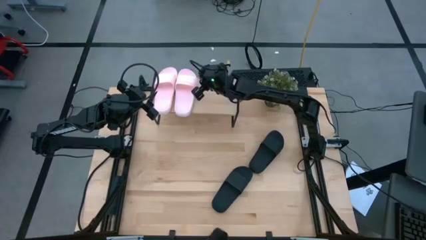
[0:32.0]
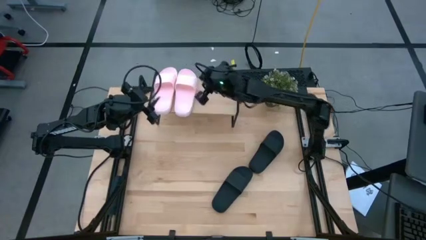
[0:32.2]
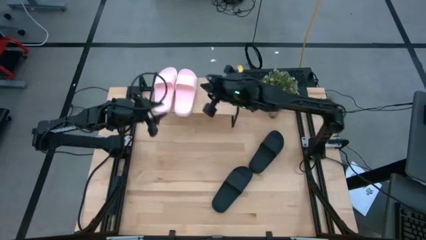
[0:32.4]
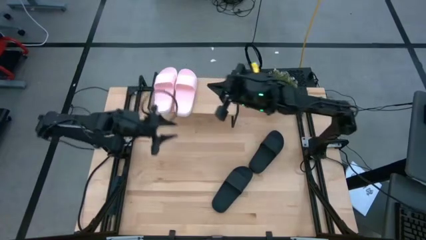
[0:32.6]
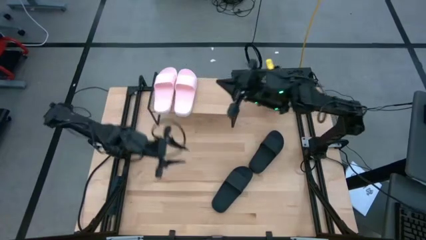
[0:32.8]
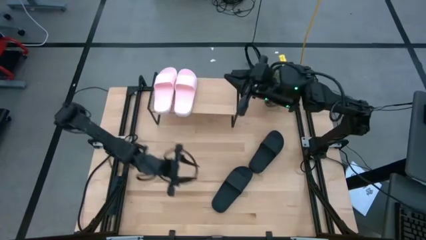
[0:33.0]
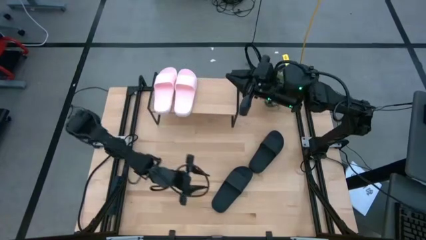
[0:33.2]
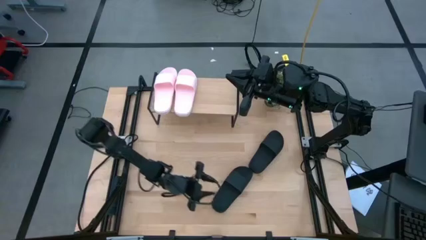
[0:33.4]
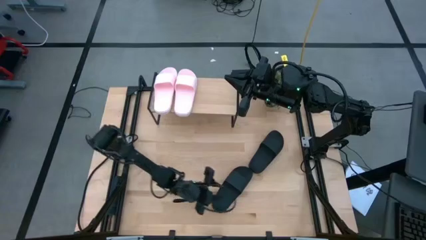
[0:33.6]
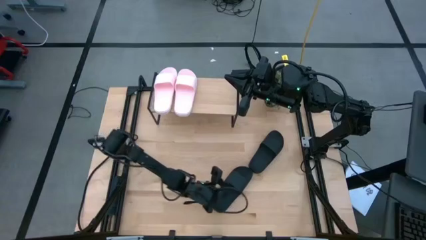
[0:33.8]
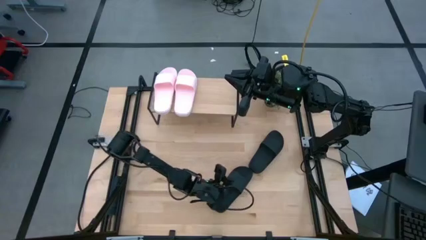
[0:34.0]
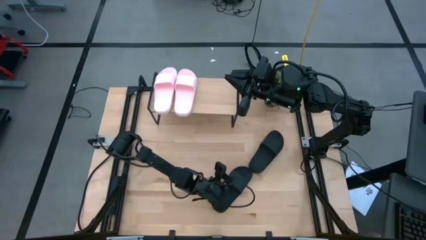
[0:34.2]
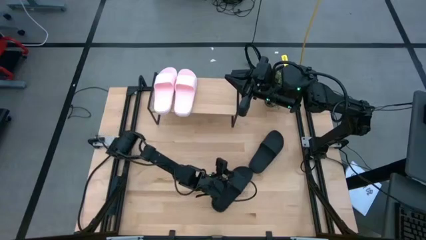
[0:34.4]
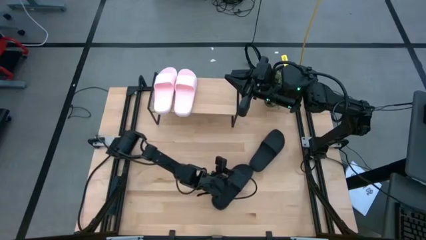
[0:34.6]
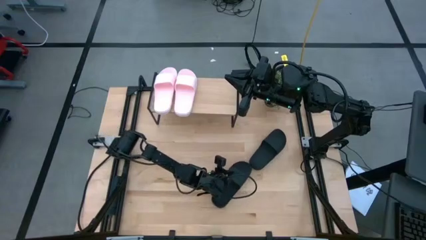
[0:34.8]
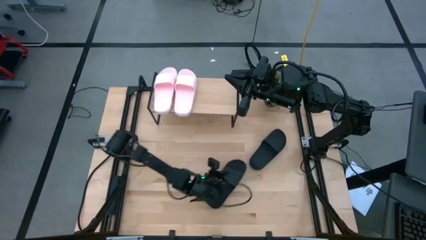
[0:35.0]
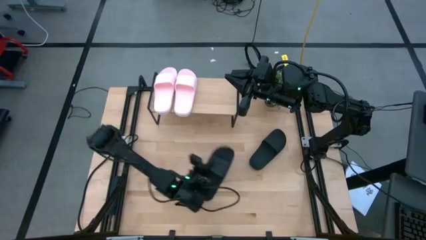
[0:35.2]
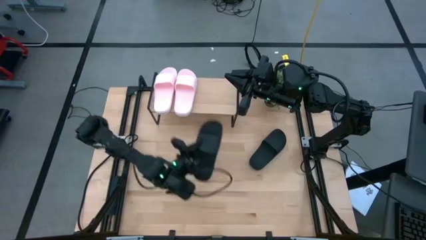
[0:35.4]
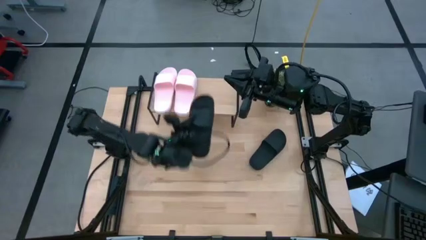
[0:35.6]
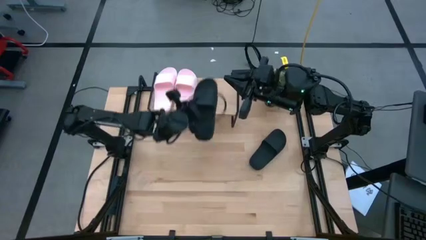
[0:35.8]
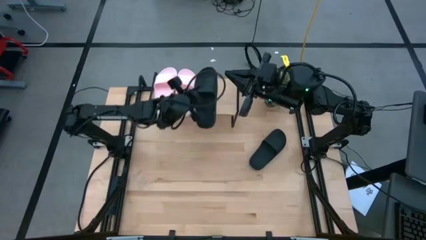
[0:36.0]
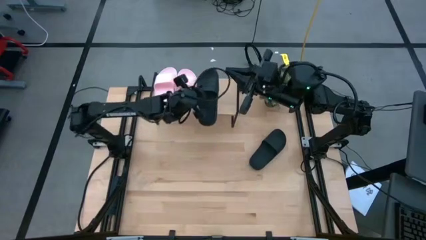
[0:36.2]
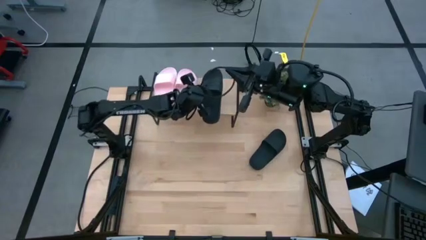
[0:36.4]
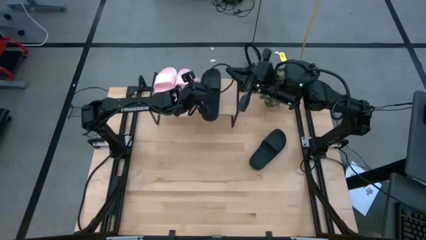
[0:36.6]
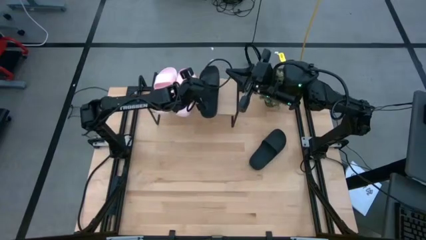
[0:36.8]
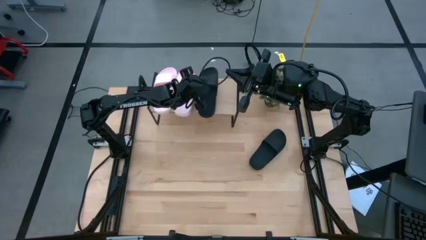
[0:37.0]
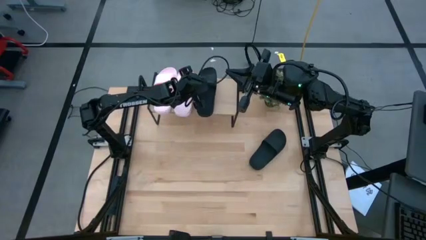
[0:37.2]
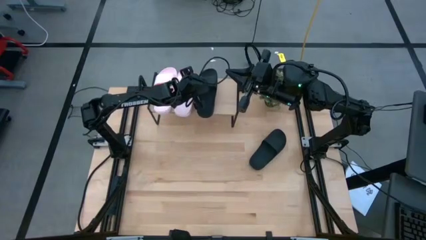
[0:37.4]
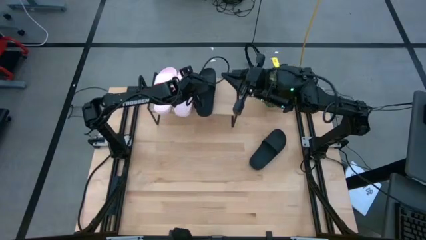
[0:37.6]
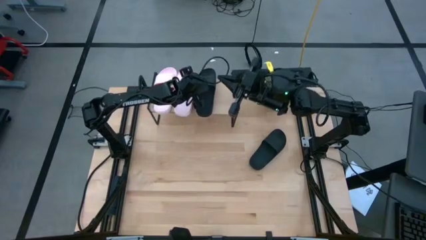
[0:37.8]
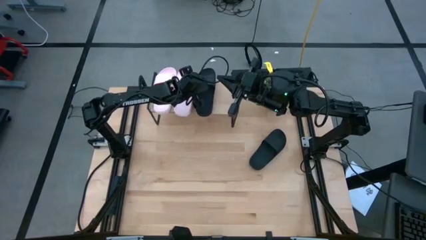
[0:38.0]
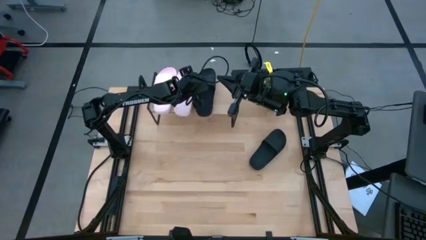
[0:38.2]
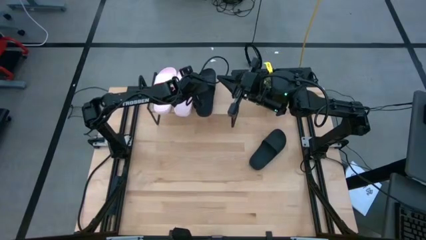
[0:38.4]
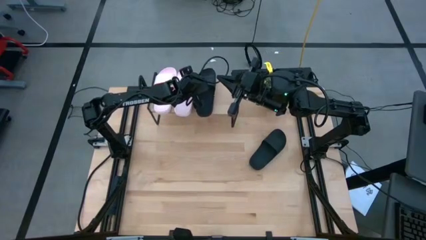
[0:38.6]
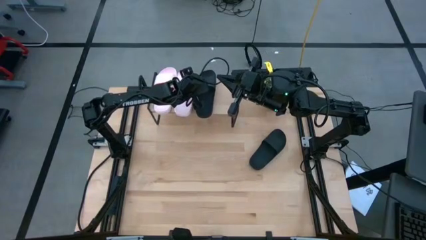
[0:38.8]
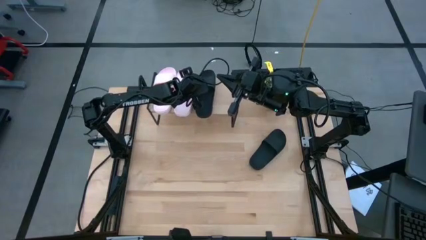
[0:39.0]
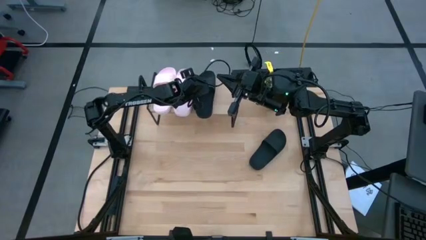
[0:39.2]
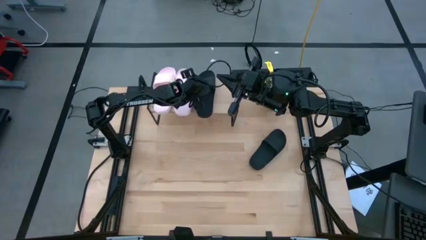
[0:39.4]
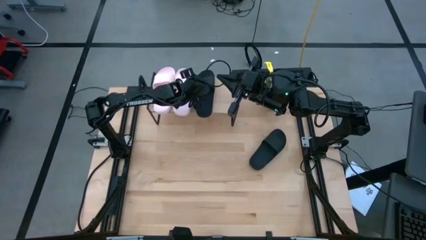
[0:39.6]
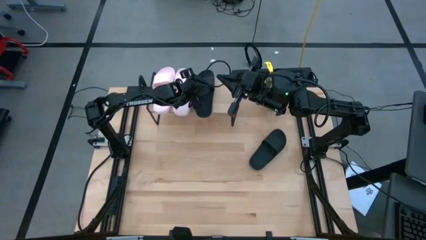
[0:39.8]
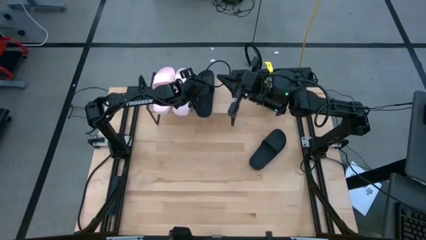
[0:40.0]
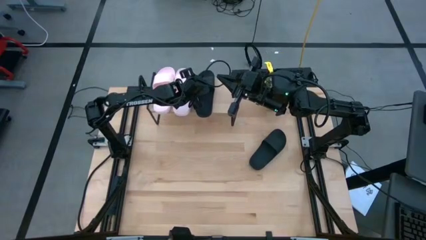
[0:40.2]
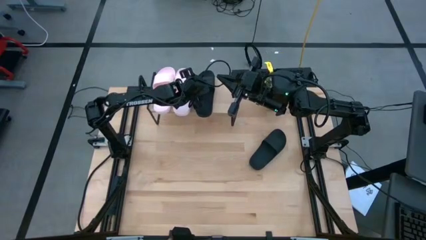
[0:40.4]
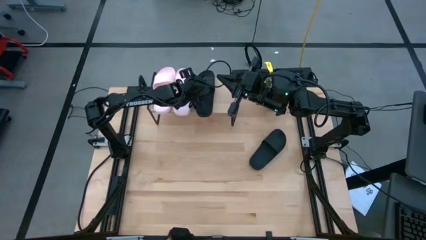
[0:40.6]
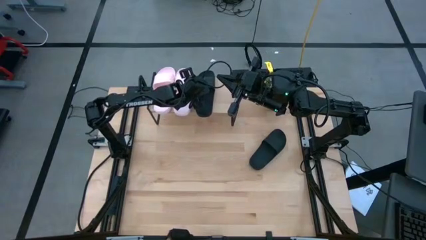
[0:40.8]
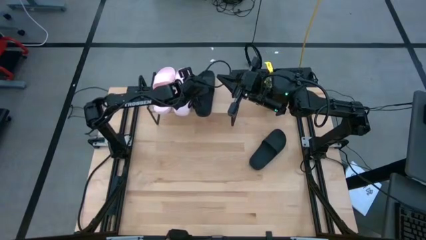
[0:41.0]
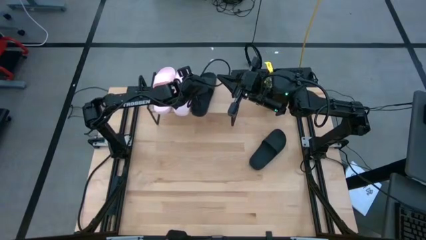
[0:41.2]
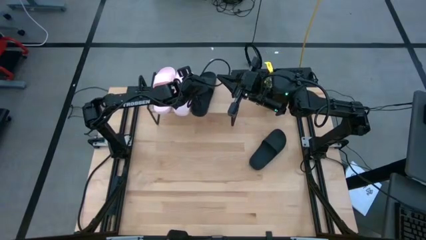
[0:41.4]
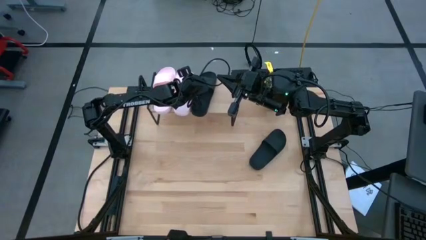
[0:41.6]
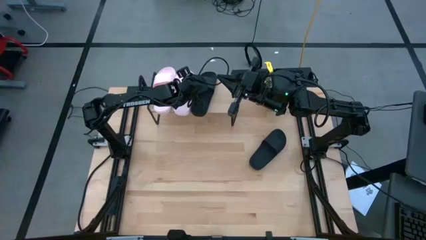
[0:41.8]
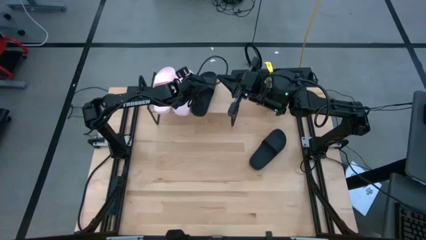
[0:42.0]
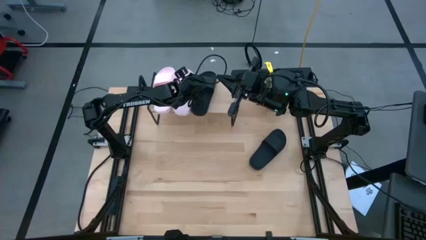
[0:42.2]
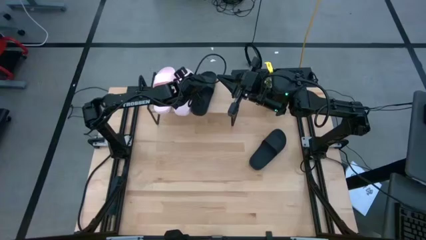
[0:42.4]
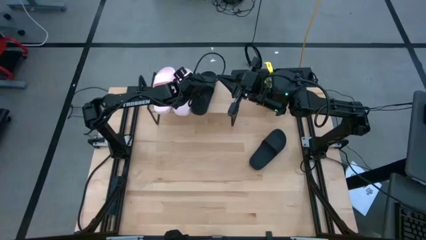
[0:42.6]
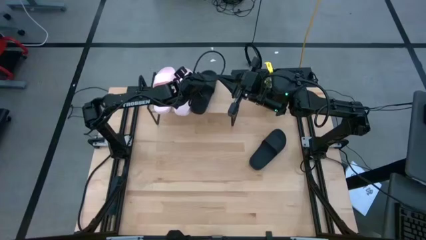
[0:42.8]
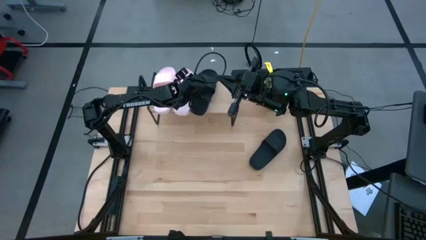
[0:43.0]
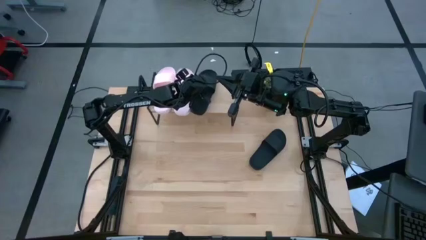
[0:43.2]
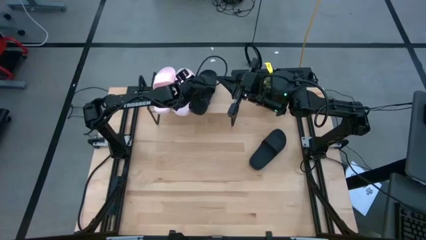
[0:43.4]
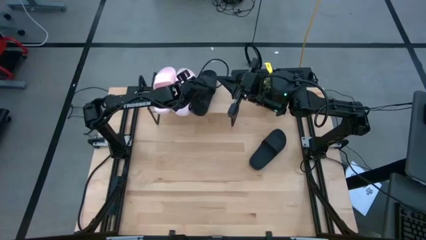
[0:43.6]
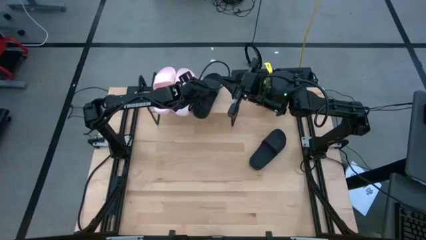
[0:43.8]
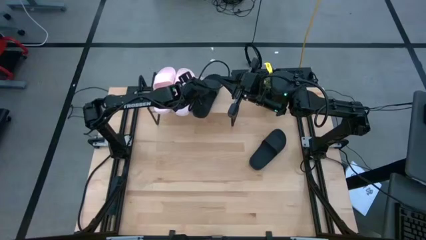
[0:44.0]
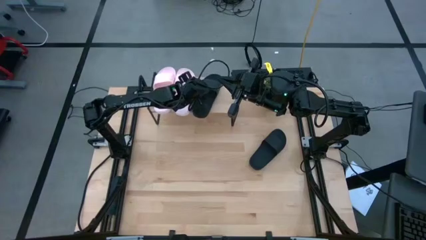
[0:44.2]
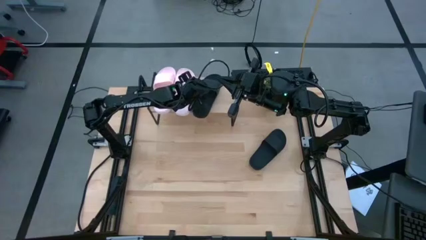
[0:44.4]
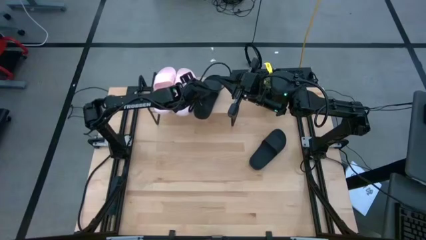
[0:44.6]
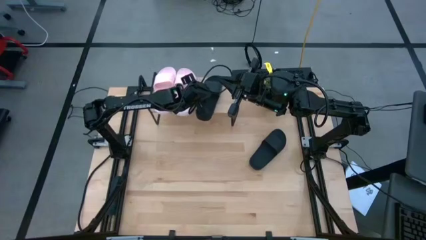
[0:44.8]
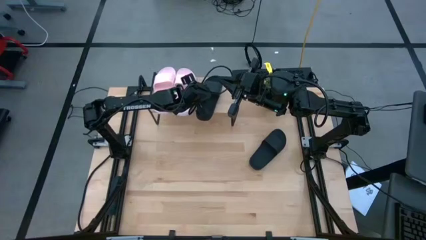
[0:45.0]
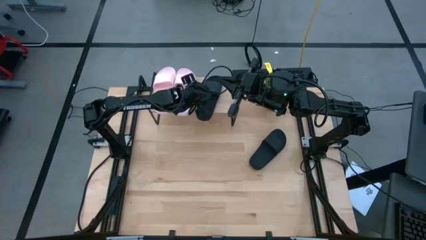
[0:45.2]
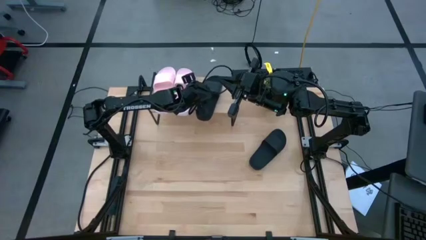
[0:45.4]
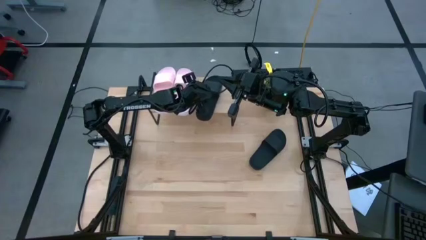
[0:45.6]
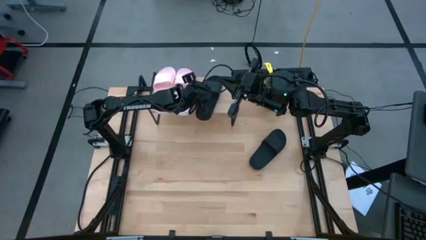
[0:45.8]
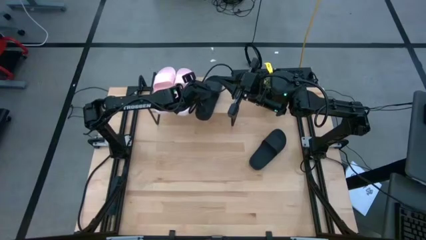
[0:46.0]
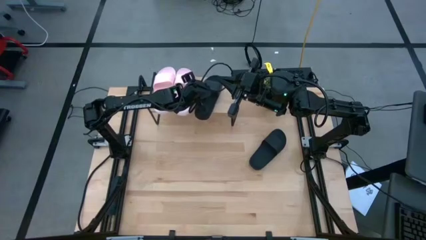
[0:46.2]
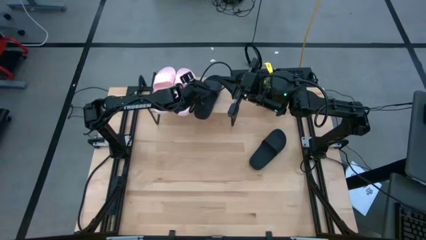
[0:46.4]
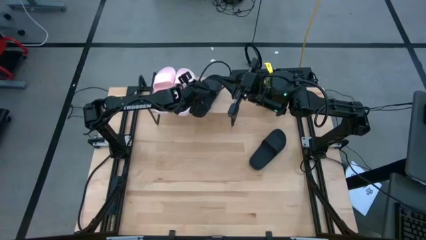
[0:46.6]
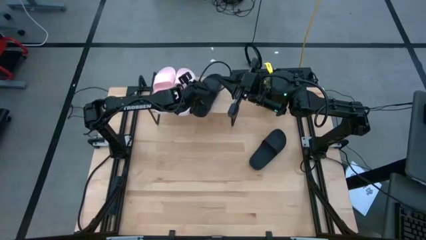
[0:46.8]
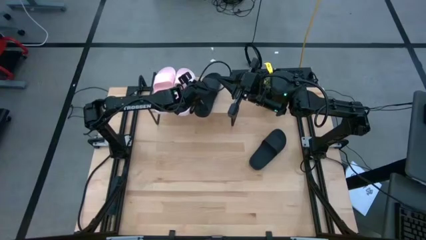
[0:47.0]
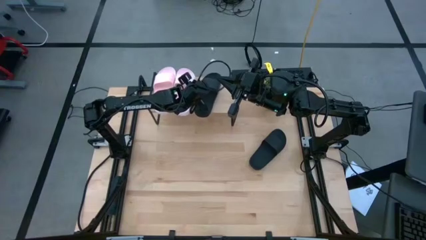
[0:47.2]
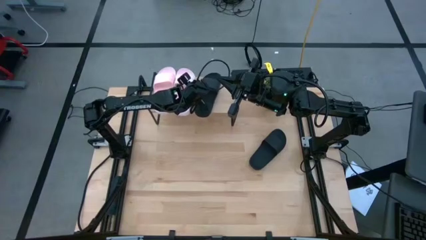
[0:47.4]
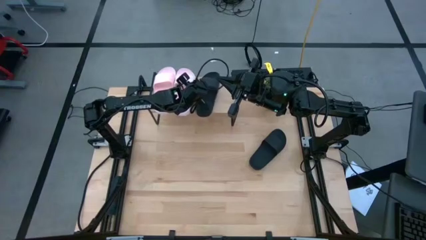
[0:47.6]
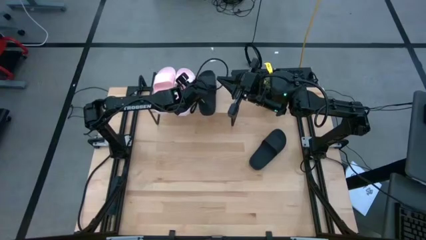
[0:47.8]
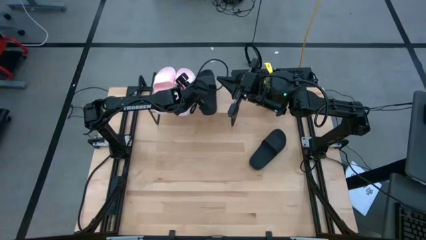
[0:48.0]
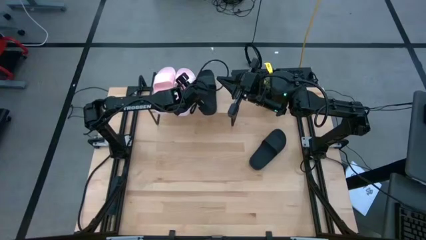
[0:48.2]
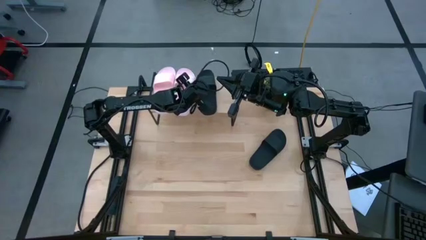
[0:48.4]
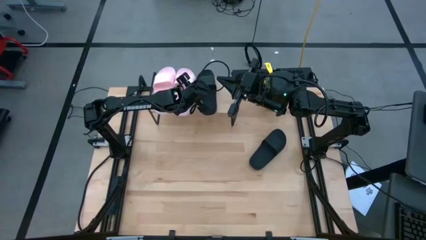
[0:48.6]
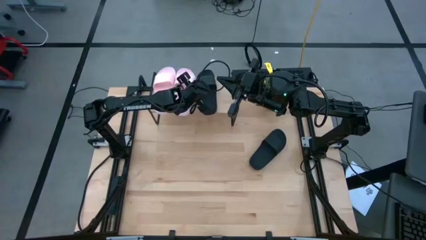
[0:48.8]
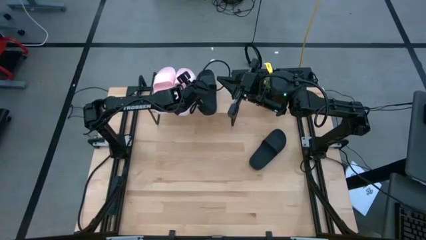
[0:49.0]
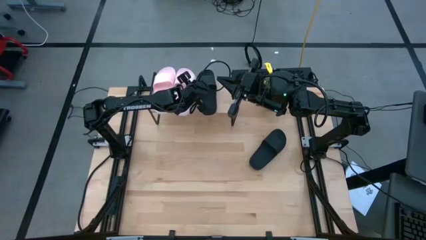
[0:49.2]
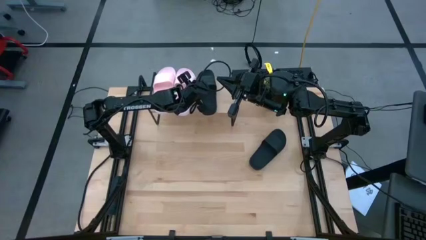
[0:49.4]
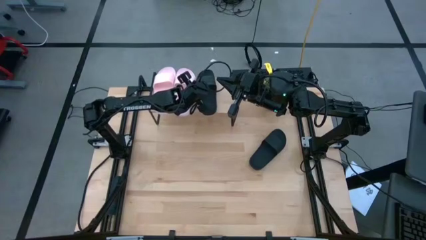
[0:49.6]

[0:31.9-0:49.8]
Task: Pick and place slides into the shelf
Put the bottom black slipper on the shelf
